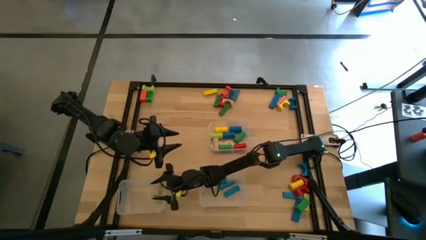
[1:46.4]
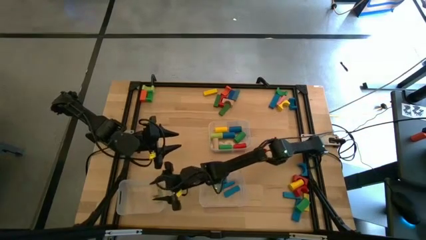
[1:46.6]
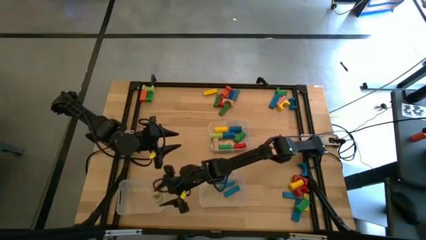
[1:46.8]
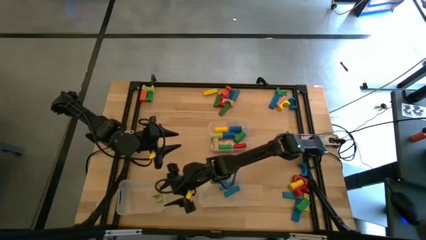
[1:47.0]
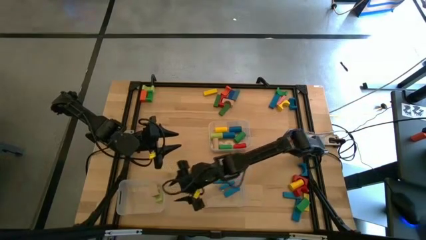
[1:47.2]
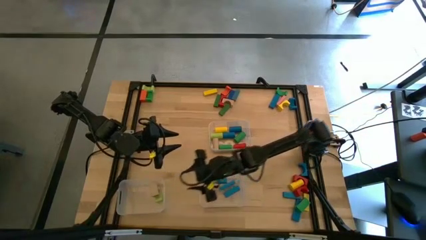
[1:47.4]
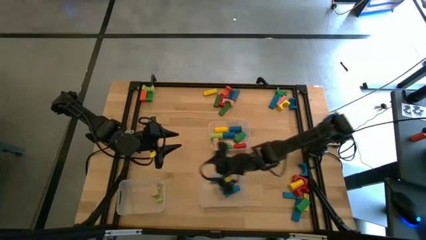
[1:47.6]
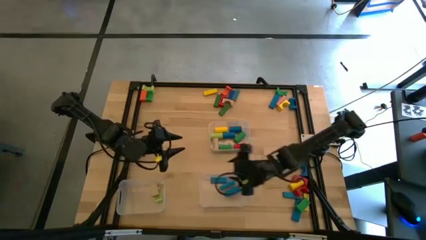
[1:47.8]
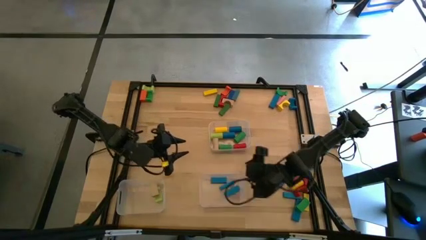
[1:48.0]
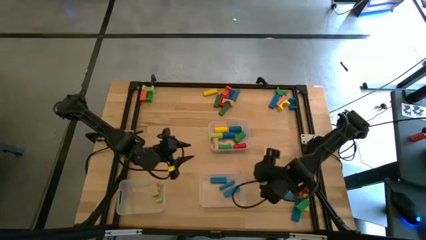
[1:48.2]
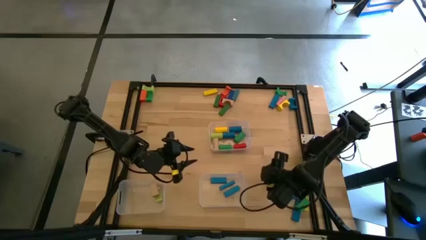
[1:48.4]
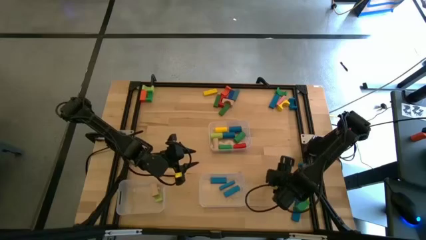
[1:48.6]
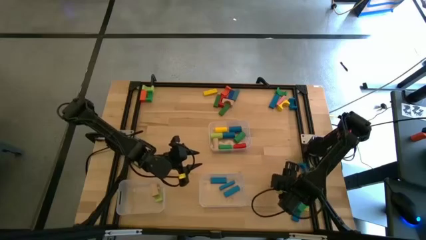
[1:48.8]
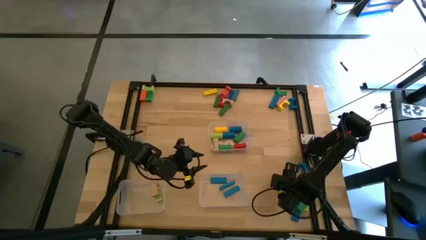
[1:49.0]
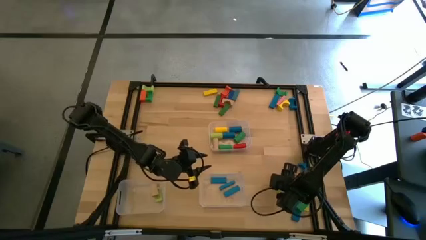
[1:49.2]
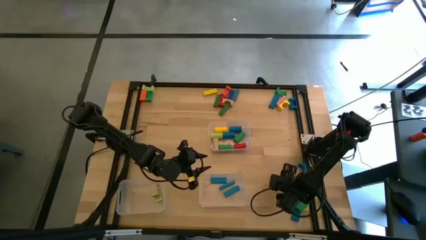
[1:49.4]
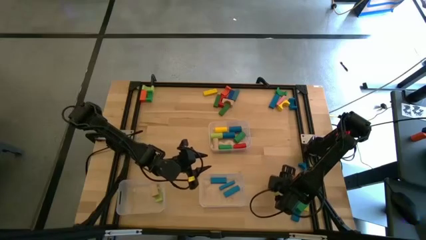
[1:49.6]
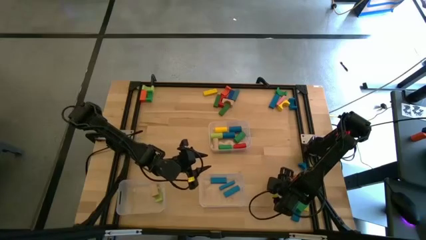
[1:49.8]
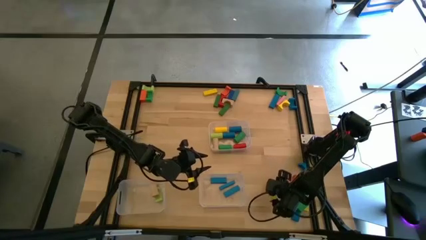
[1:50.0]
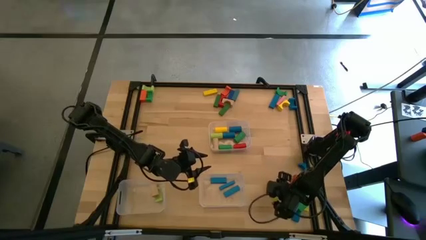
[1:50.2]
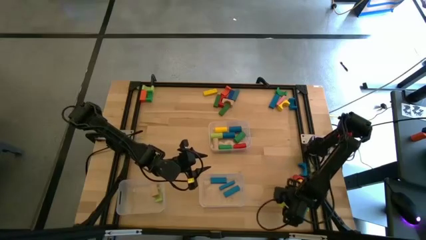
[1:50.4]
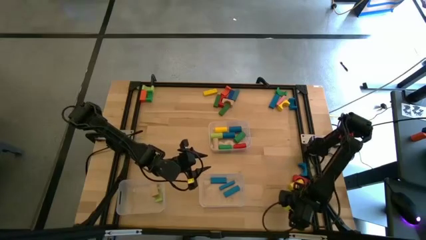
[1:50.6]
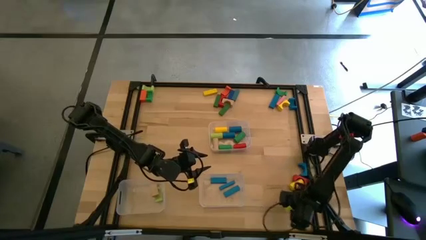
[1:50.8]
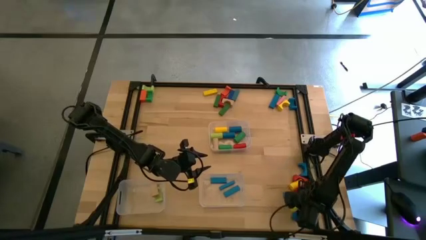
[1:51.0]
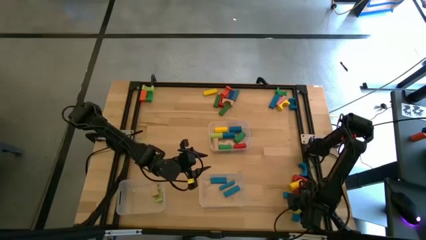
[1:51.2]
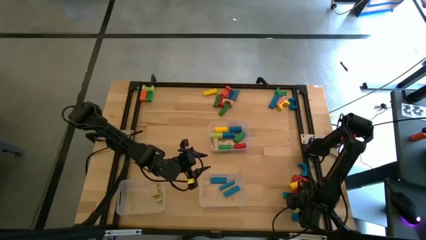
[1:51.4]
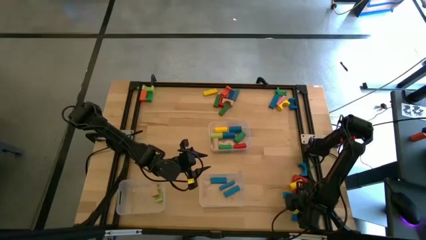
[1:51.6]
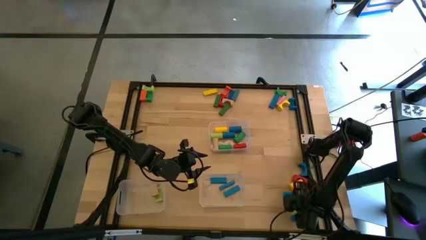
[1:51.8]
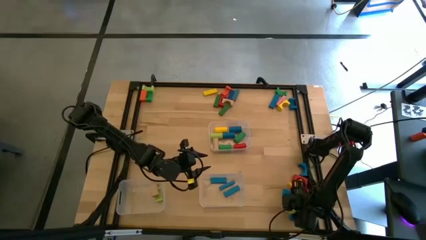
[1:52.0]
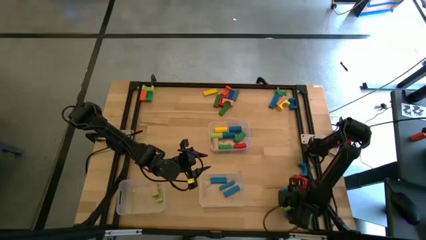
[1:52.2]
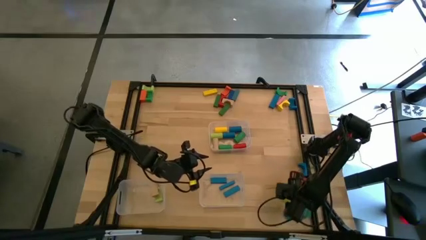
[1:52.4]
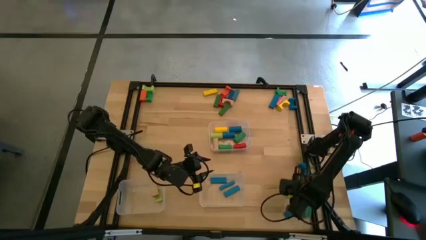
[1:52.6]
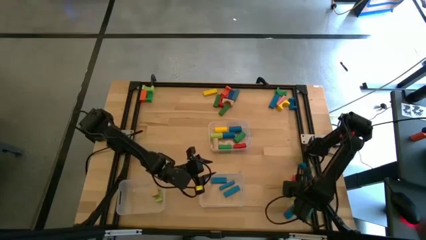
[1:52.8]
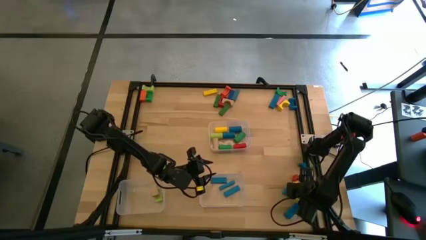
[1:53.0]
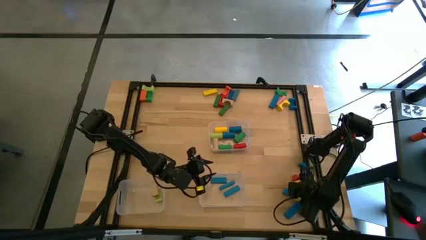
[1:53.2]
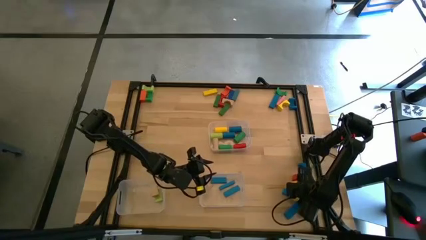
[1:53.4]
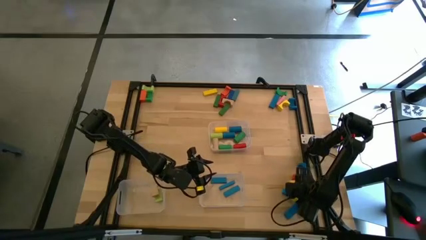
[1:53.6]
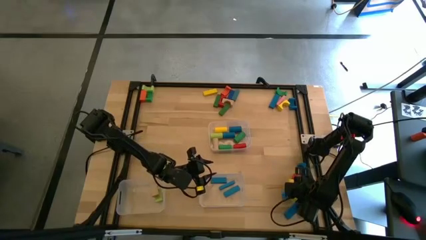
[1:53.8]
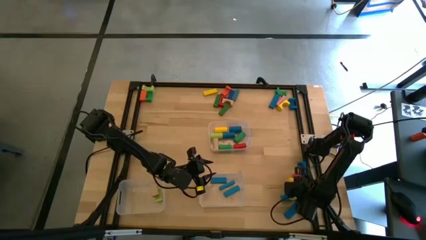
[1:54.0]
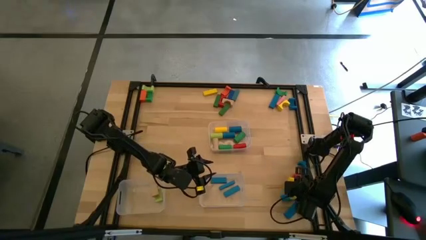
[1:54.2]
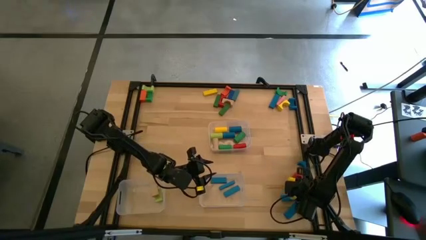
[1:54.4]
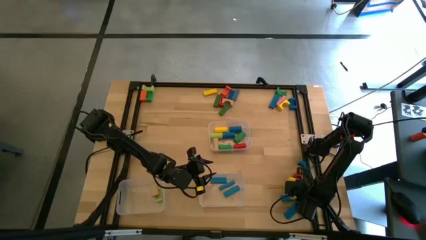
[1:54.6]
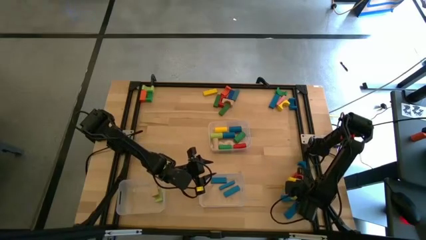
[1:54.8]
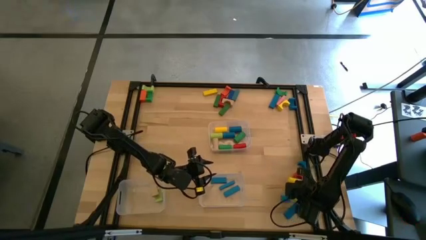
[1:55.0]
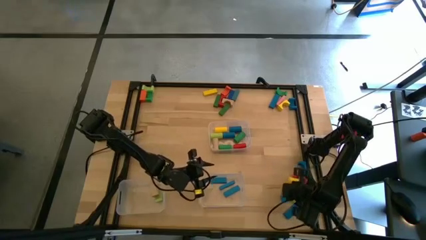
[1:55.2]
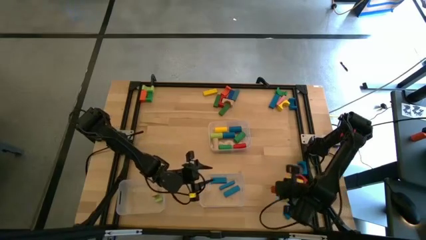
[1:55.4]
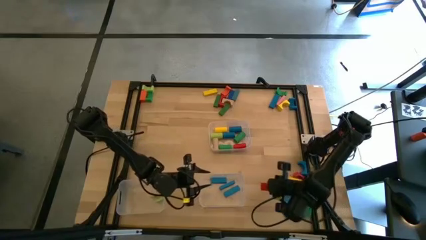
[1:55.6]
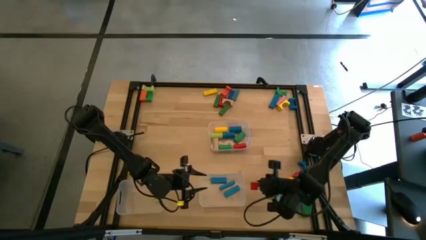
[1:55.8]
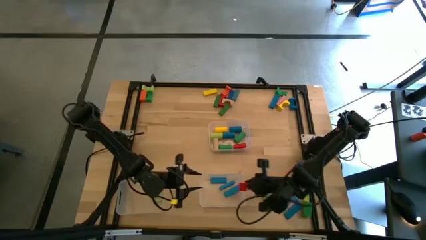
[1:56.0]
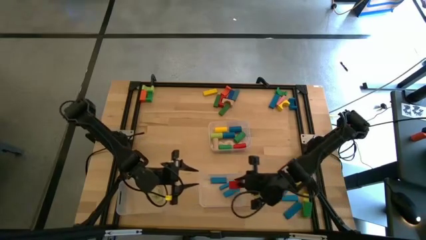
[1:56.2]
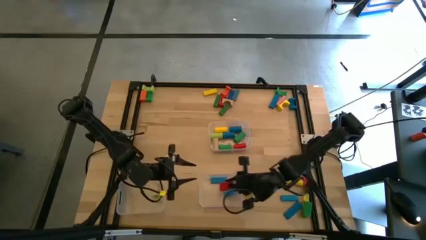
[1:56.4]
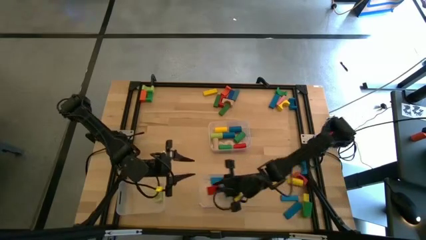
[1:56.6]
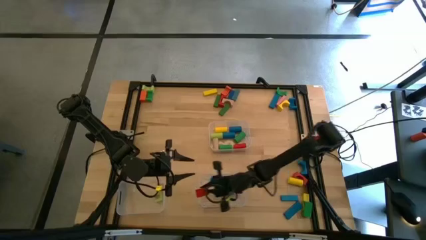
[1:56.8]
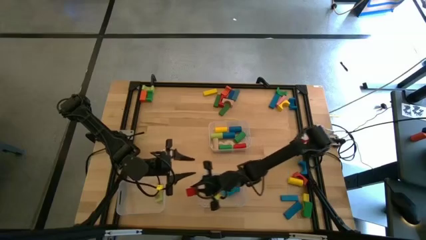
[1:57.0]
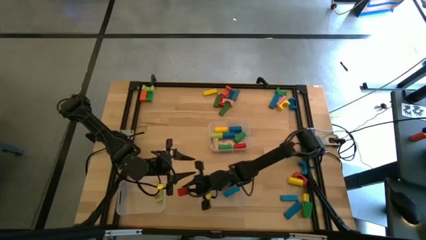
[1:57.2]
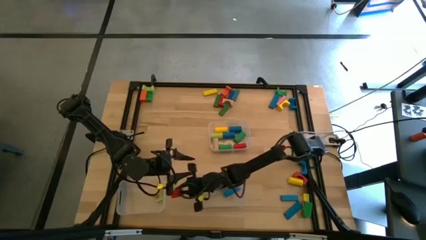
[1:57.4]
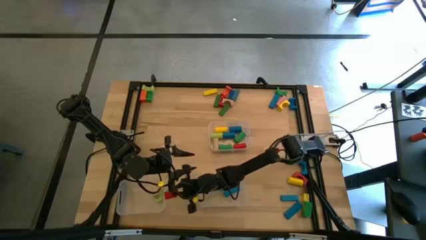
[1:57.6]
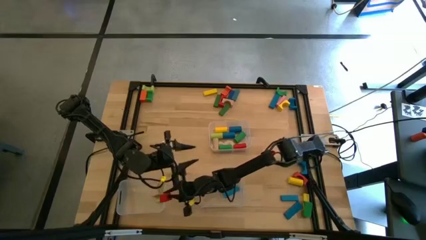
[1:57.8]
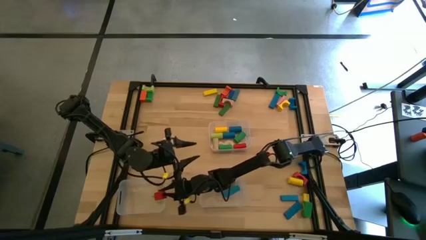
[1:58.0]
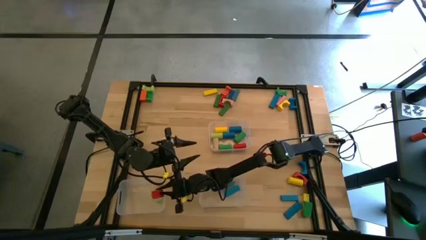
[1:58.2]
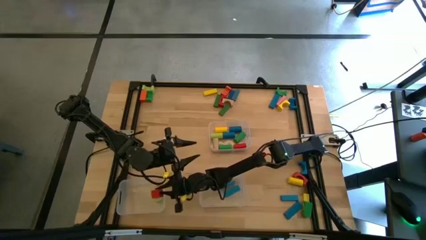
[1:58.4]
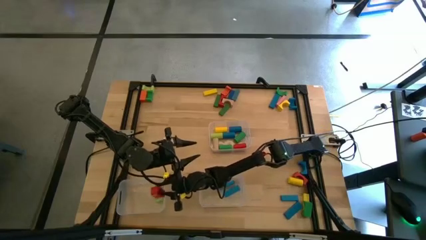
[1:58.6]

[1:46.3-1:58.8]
Task: Sort blocks by size
Put the red arch block into the bottom left transparent bin

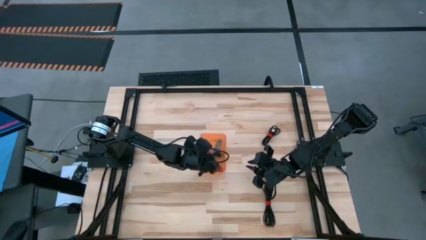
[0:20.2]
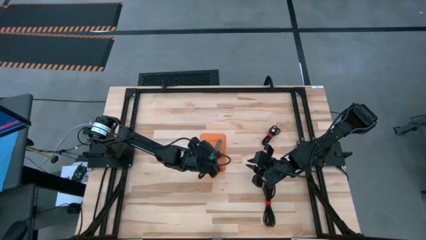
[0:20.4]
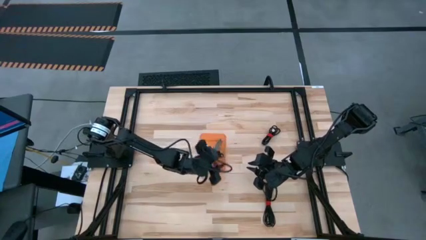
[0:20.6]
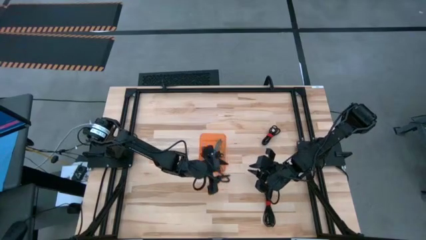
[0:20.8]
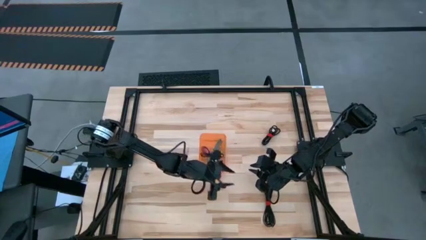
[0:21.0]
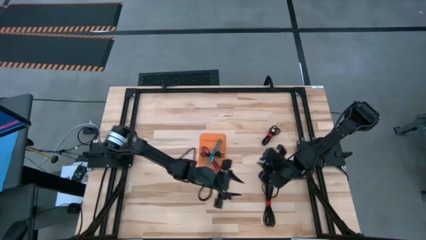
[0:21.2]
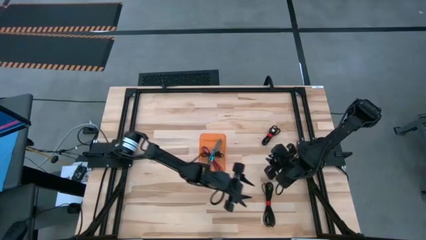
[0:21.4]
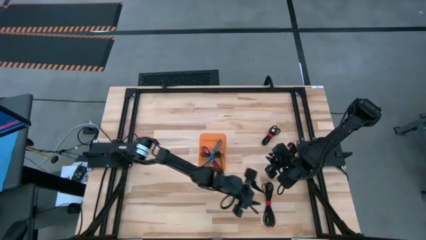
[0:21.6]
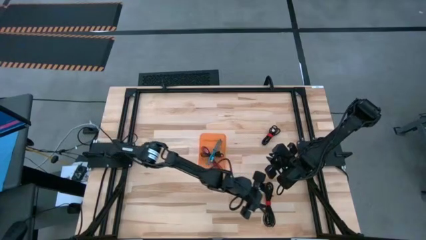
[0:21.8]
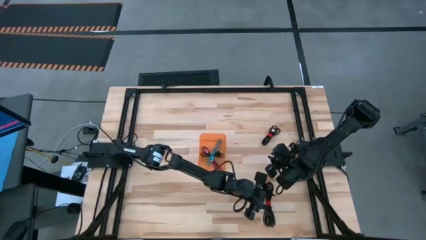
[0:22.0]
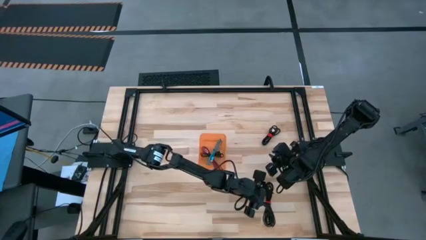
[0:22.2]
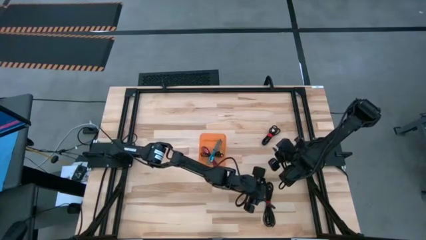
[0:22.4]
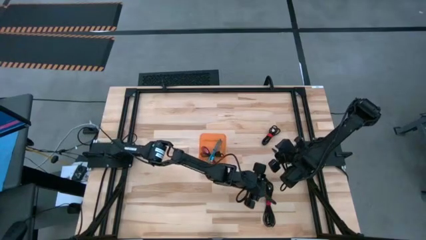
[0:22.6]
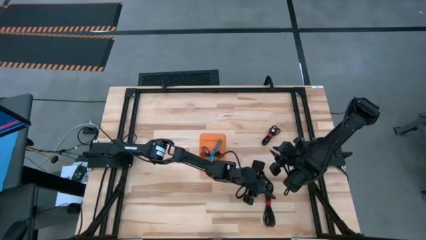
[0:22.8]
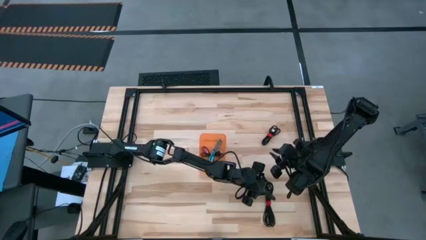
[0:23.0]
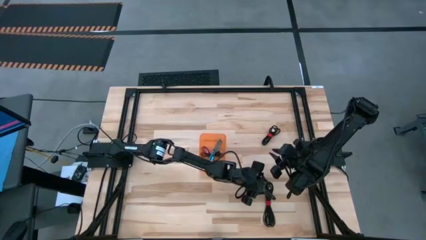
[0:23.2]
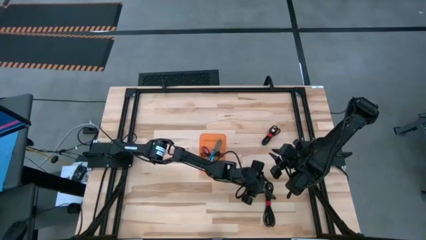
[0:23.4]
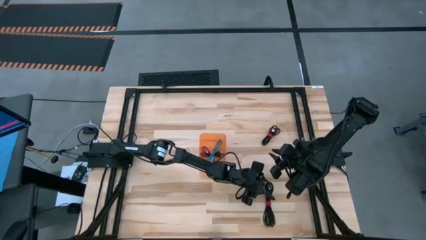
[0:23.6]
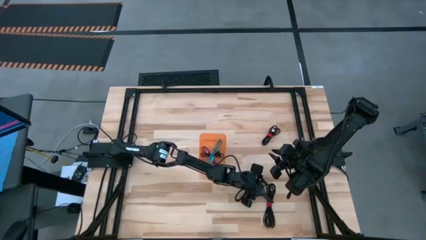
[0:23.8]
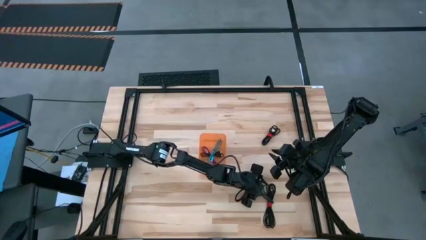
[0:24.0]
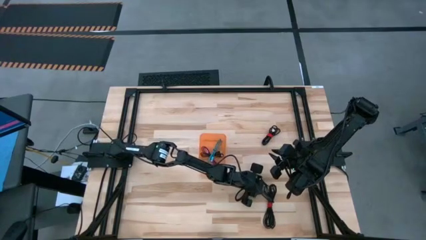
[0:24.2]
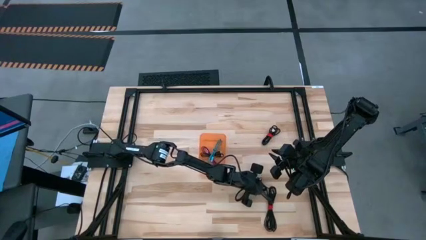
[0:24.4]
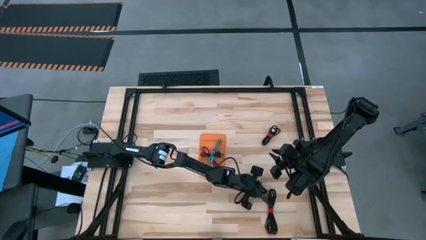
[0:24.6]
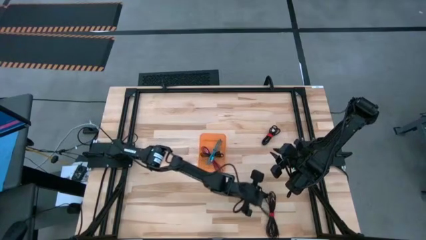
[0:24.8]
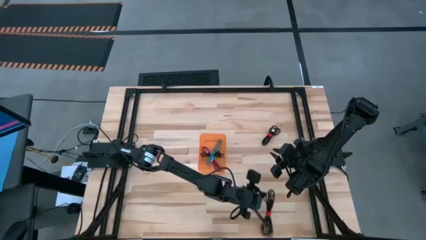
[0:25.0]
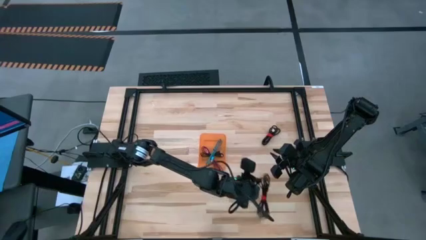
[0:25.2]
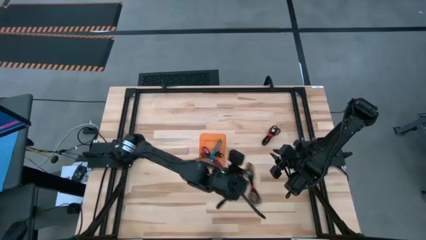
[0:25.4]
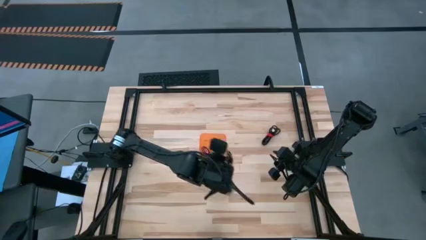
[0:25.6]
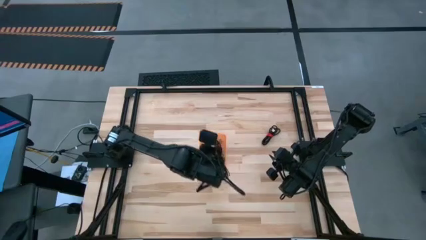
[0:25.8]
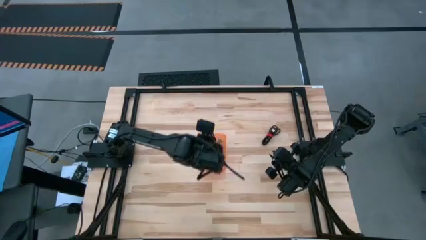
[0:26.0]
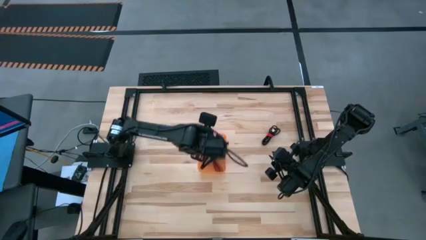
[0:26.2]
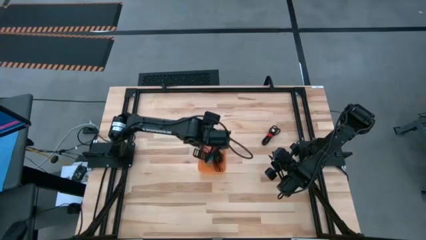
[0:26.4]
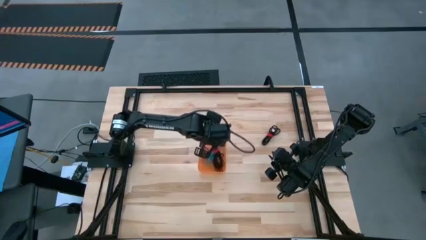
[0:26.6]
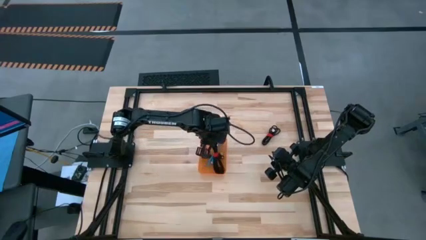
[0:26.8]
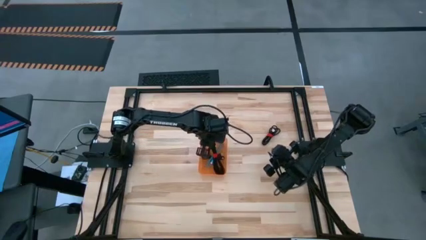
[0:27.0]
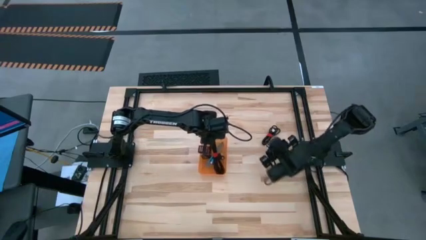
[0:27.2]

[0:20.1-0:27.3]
Task: Pick and place USB-C Cables
Put the bottom black charger cable into the orange bin
